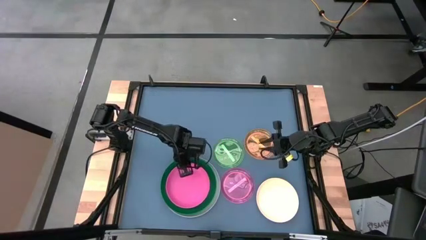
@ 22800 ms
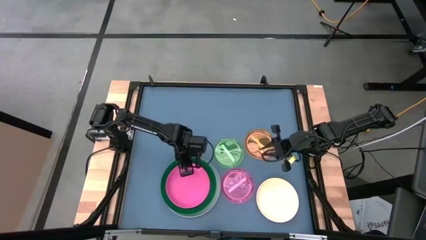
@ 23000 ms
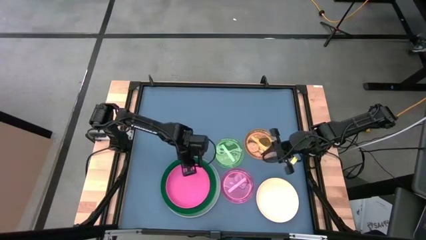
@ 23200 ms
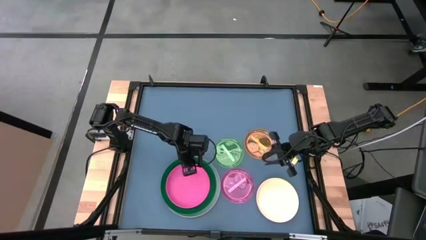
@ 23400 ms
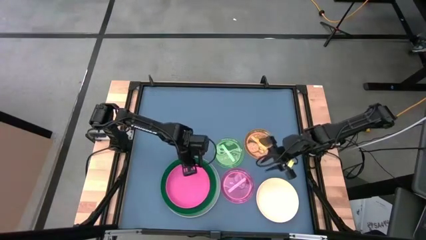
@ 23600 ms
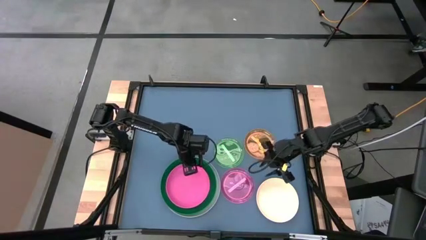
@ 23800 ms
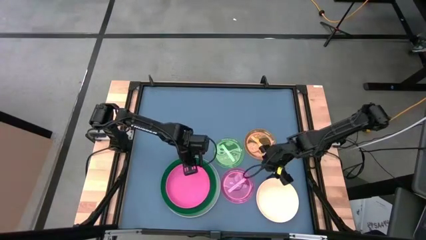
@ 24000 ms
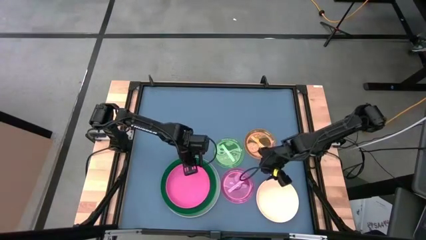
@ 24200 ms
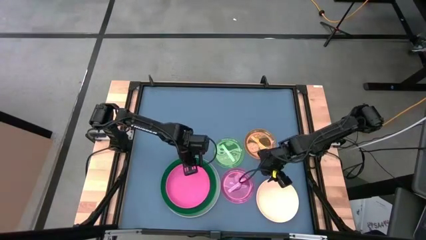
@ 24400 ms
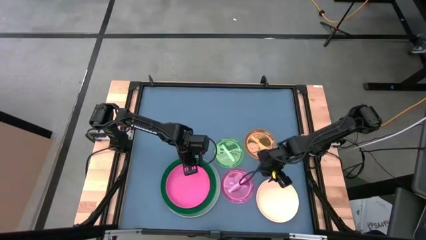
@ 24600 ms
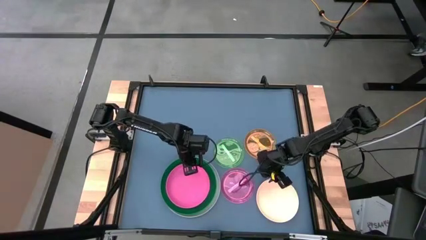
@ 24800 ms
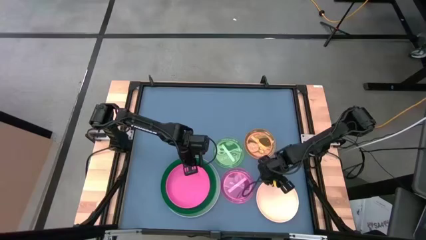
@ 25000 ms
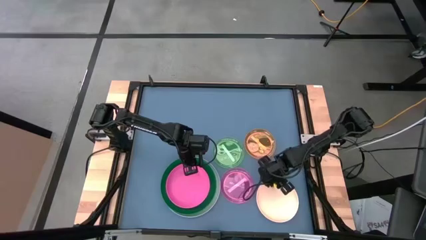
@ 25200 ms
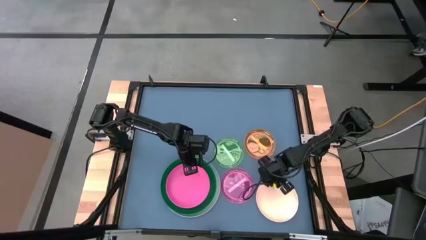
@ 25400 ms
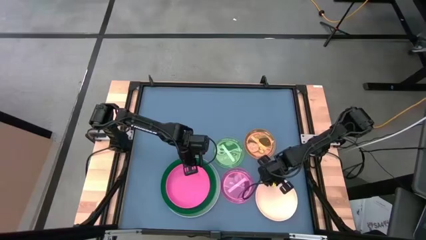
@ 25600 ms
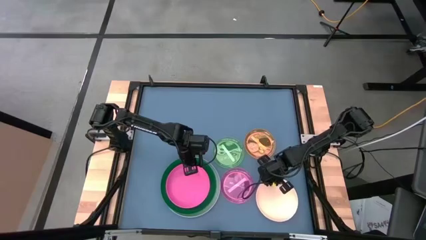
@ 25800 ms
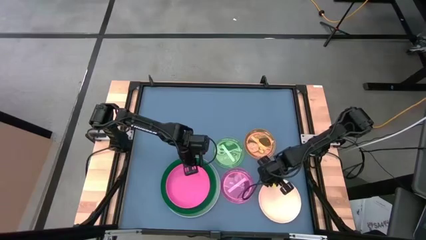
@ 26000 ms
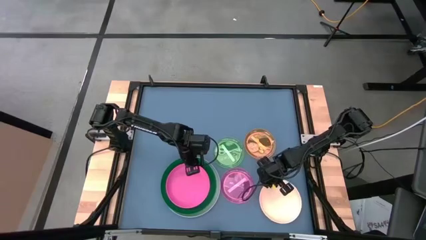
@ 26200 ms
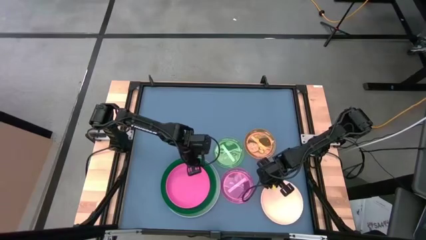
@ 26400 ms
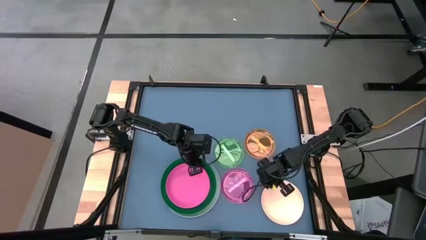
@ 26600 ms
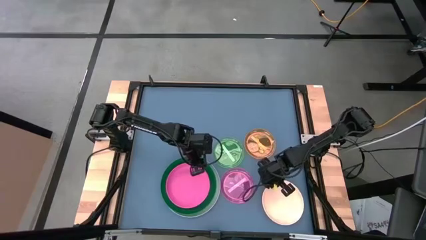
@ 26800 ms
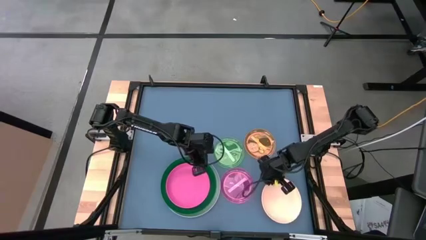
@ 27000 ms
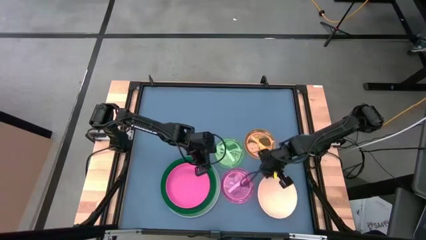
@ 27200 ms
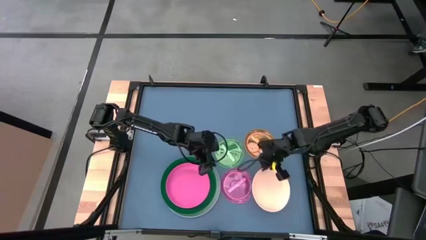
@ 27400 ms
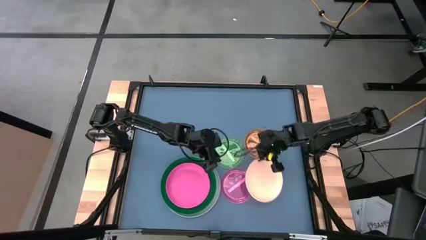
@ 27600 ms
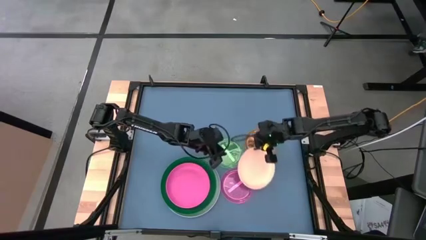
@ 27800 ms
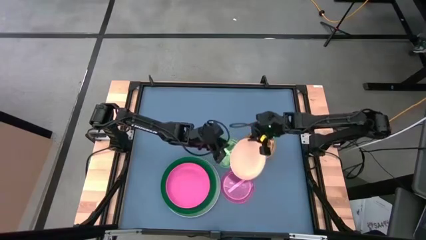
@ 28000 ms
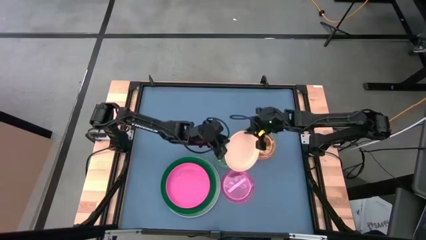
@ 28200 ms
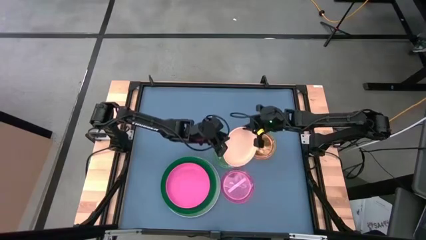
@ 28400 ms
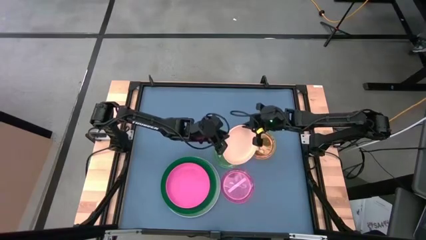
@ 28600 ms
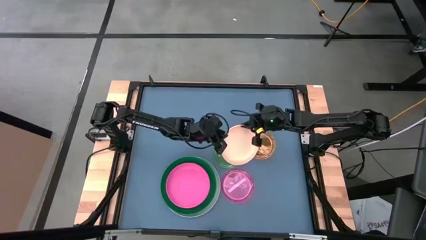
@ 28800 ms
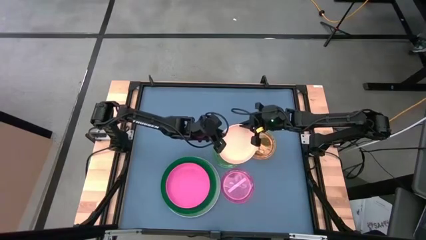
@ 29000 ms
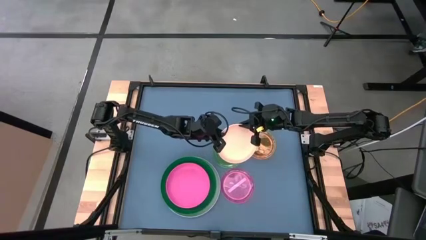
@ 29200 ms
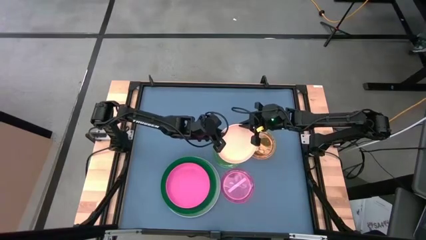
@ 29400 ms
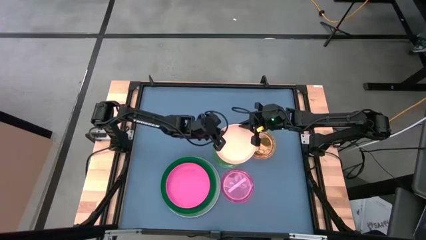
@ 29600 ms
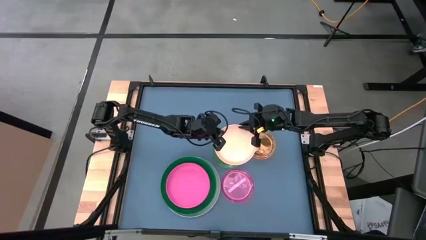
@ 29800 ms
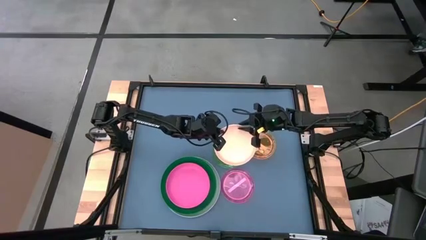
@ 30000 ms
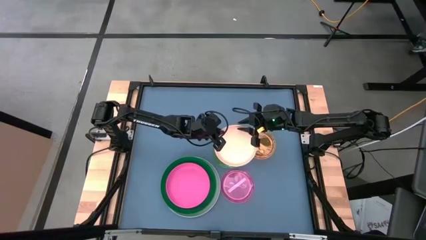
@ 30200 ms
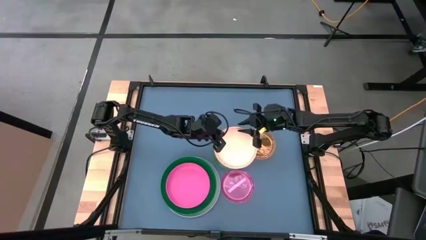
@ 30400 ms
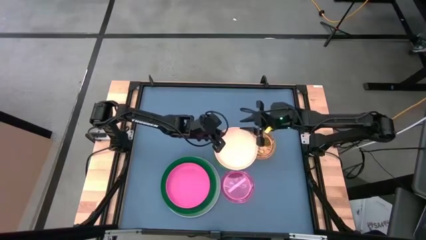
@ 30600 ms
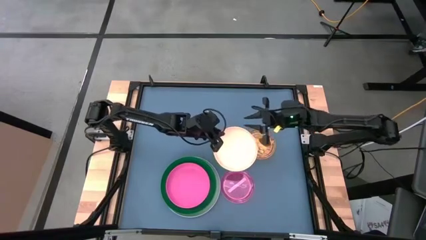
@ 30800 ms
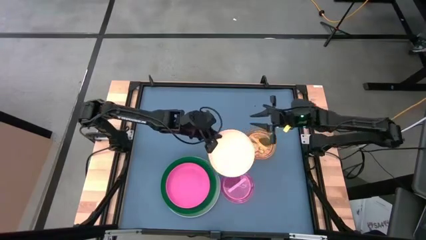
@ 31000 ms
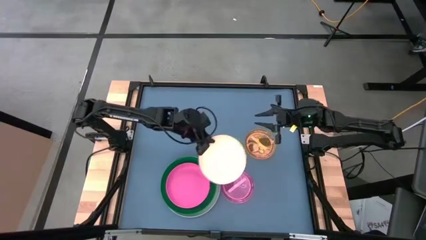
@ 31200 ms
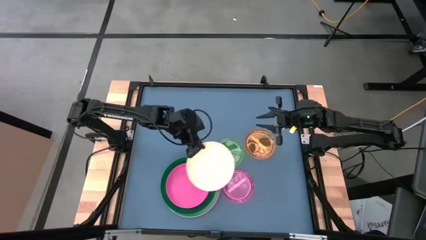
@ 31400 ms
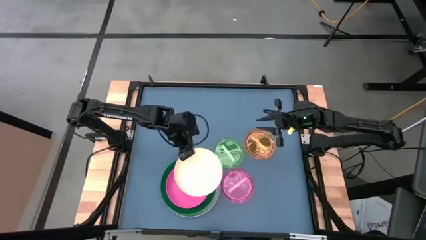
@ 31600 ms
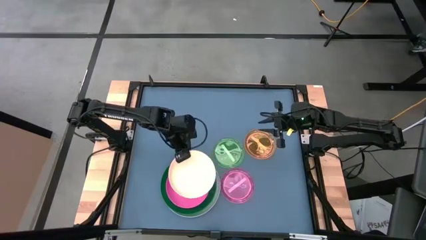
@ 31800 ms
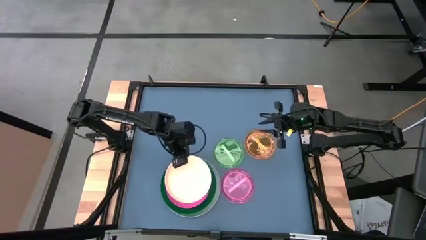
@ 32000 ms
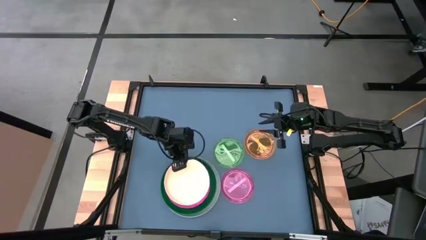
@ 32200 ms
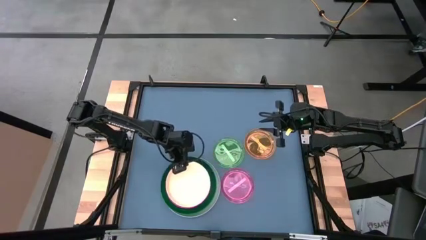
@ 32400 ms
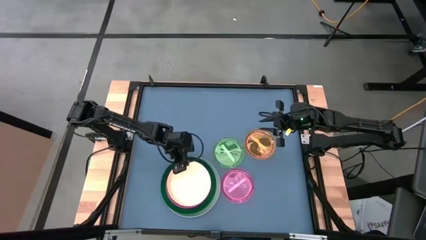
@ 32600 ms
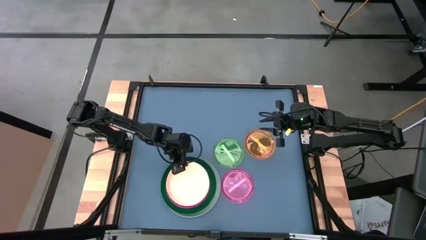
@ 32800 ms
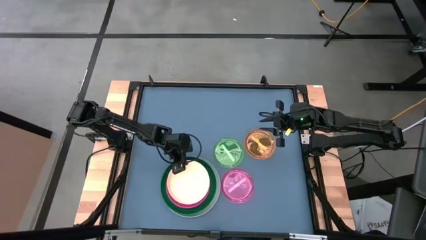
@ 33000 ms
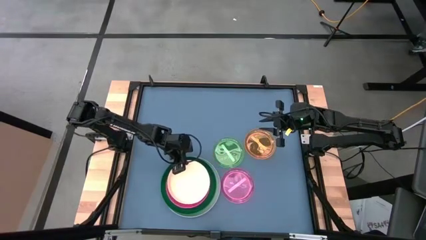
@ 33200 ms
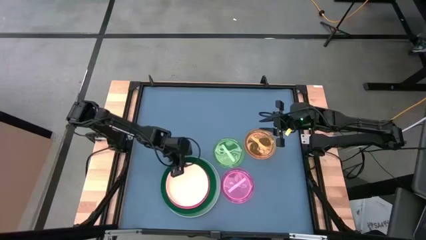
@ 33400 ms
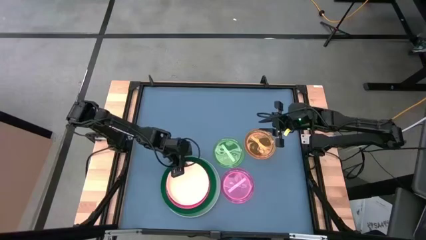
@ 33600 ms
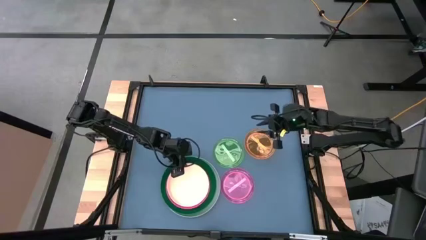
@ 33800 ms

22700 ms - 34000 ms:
Task: Stack plastic plates
Stack the white plate on top of the pink plate
